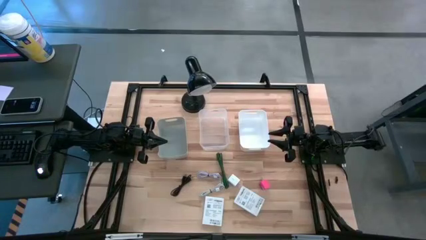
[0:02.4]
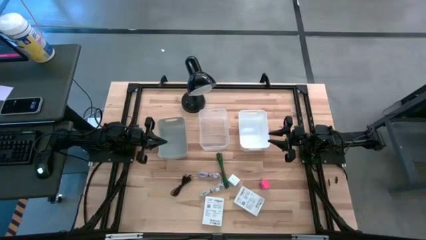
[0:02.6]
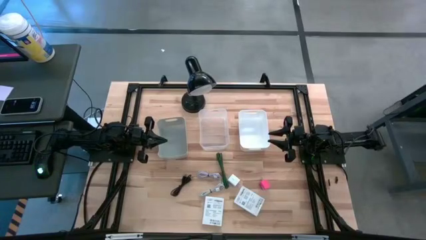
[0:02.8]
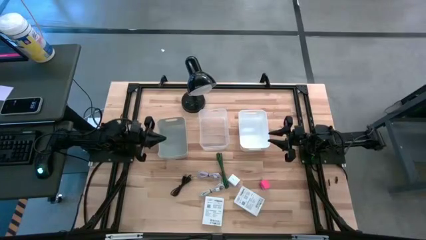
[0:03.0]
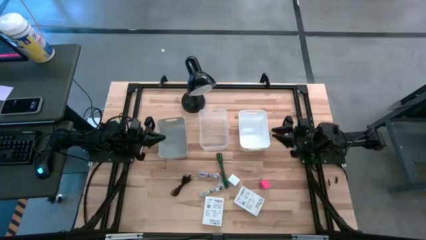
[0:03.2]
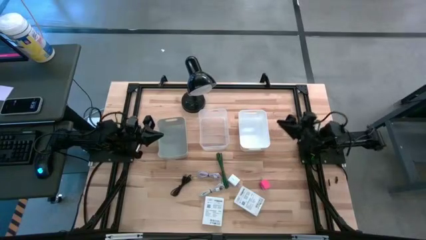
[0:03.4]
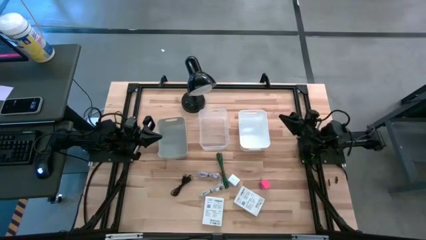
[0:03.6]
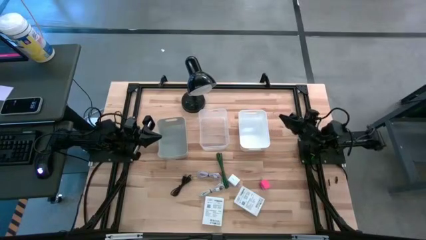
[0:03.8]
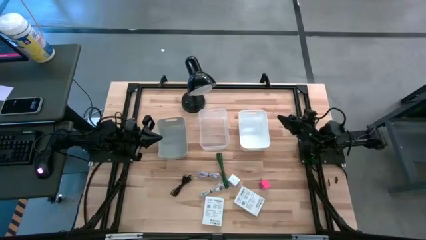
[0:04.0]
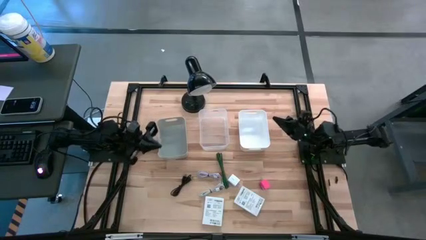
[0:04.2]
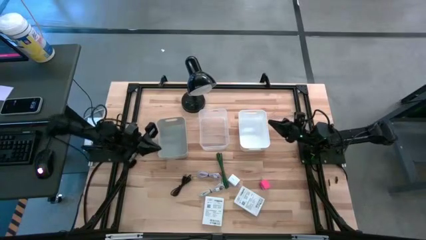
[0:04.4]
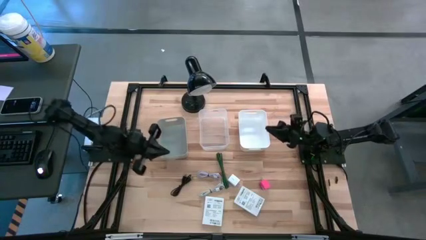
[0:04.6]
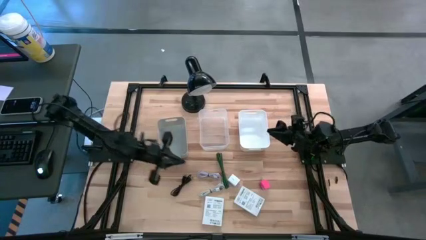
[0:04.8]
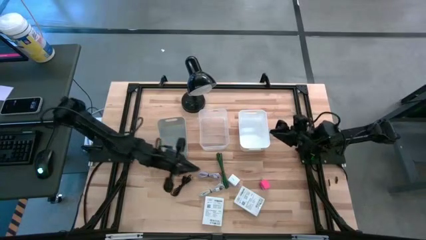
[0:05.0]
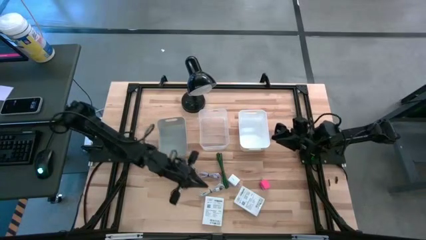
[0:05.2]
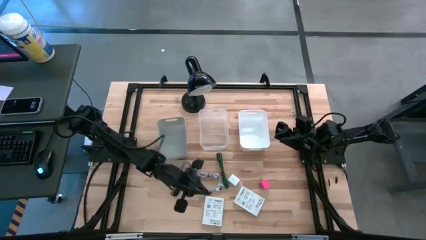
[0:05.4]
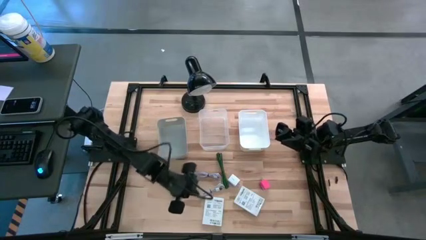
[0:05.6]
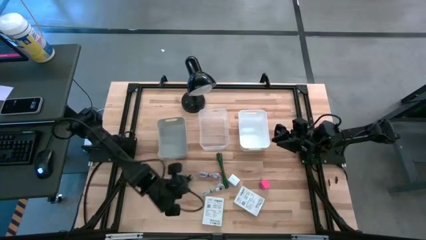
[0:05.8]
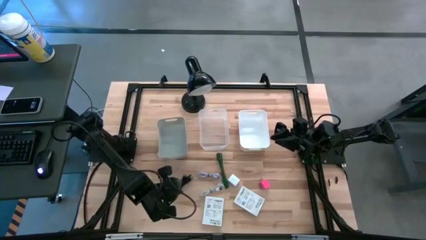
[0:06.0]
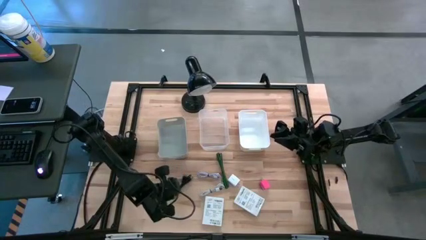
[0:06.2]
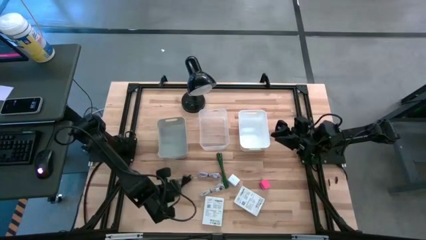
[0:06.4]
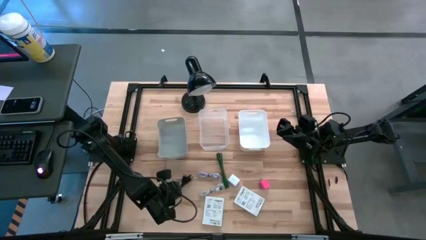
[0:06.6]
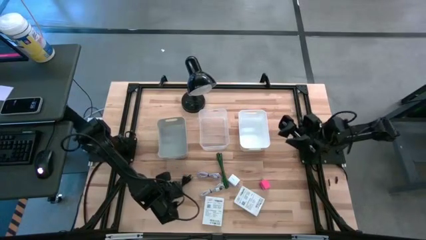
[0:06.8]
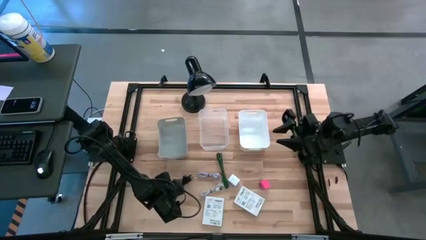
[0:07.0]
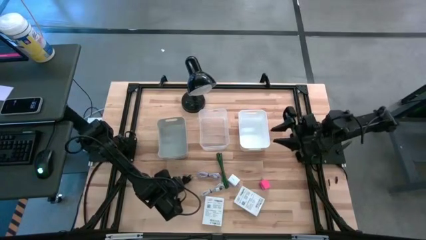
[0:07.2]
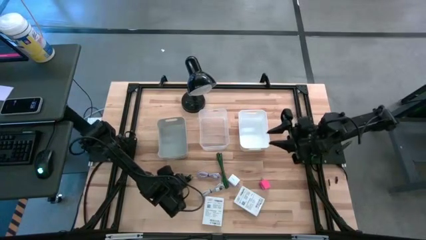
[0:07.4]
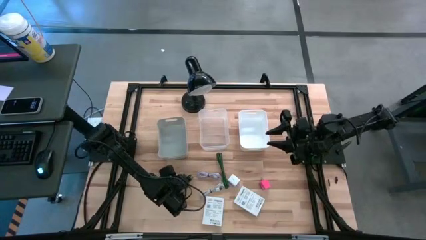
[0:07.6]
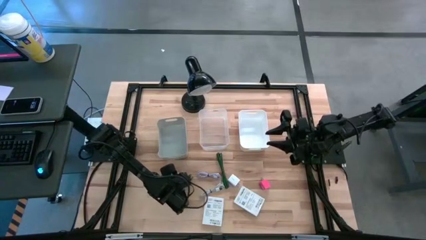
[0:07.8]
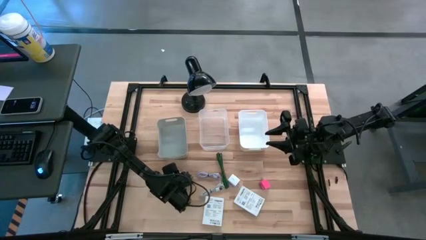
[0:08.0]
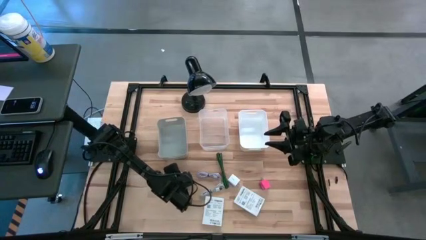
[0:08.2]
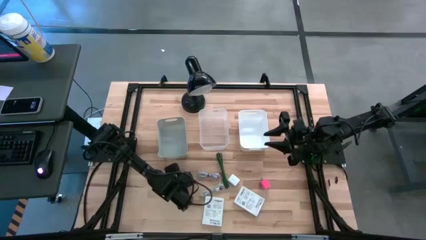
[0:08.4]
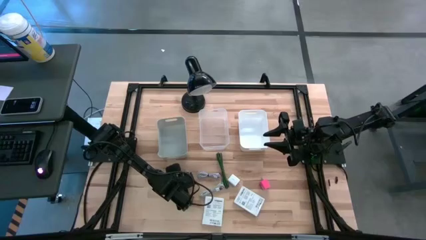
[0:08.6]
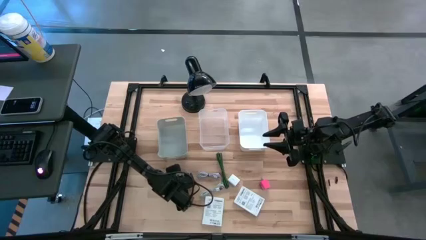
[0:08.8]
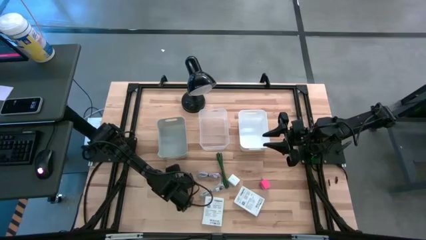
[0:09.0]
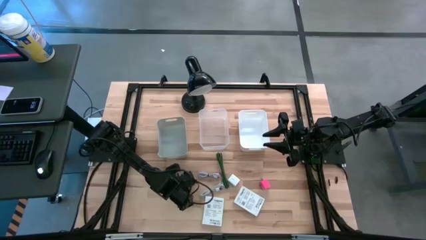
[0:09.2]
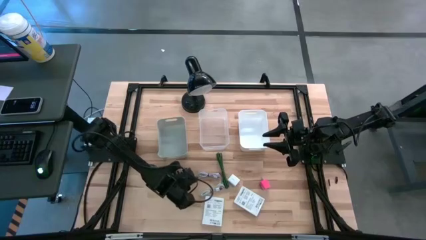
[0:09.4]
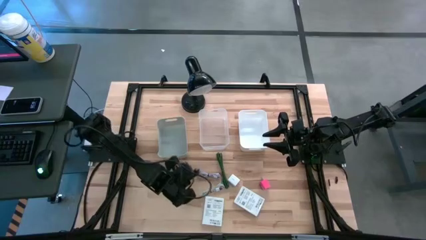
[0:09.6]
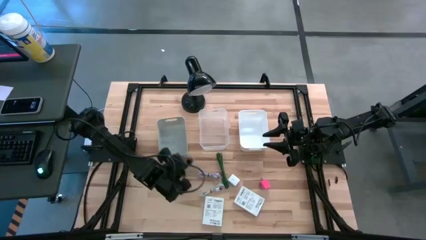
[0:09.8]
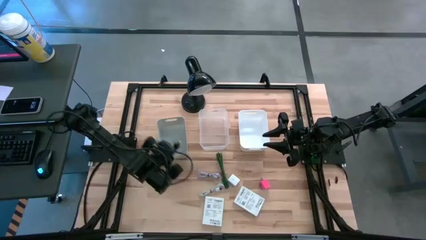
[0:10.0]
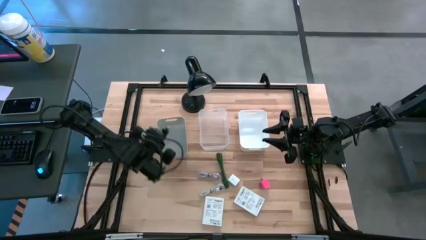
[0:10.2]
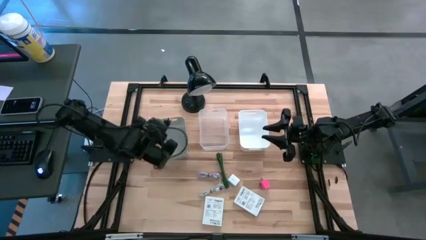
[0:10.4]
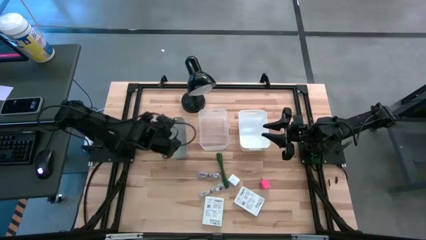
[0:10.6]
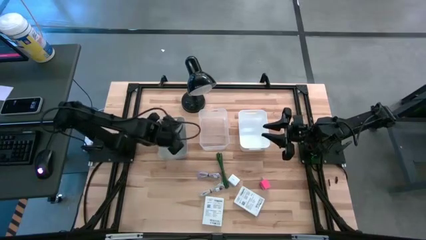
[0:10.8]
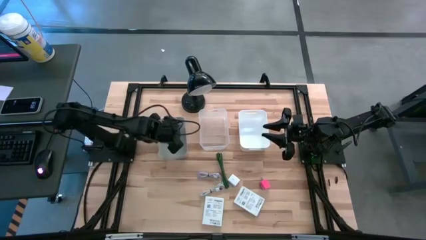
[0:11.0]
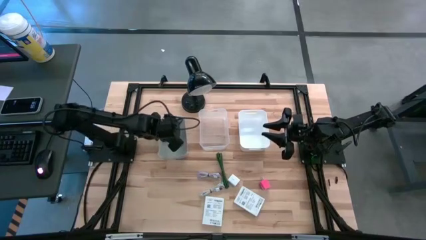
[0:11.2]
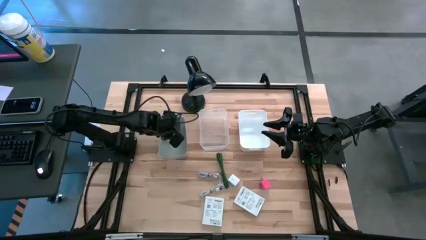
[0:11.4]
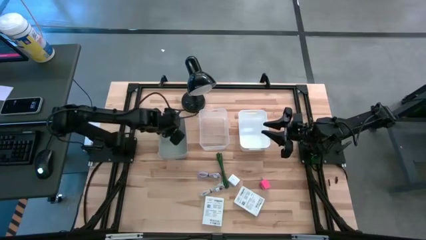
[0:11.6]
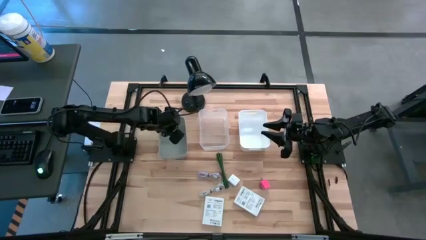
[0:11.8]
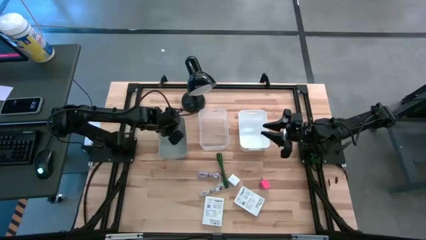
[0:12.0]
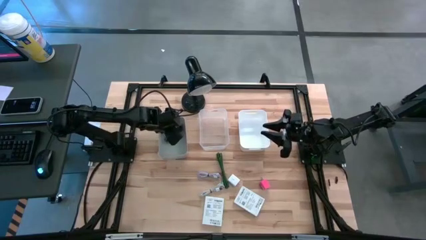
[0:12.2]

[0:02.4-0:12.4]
Task: Pick and place items into bin
Put the black charger cable into the gray bin

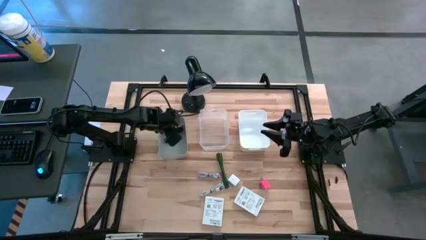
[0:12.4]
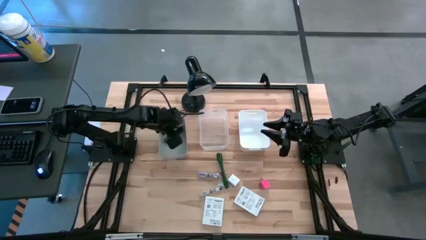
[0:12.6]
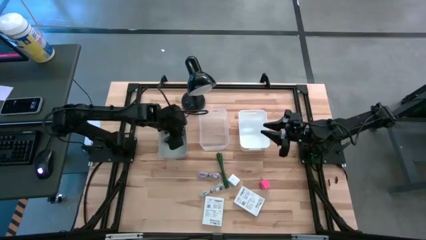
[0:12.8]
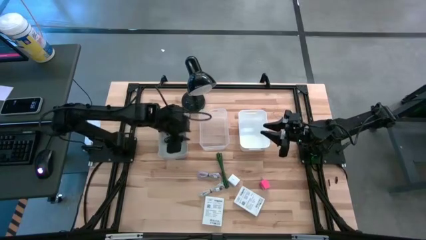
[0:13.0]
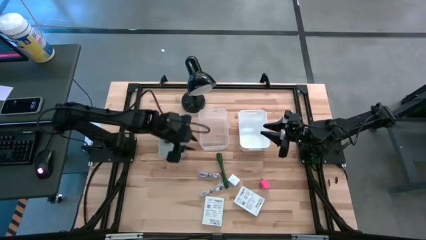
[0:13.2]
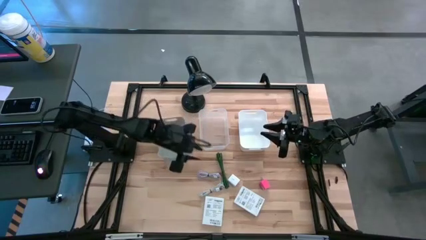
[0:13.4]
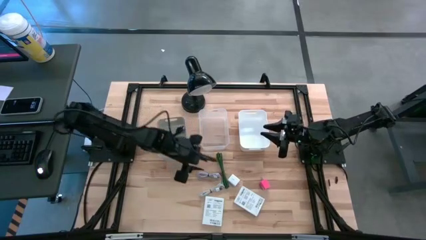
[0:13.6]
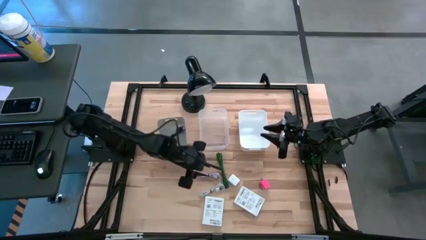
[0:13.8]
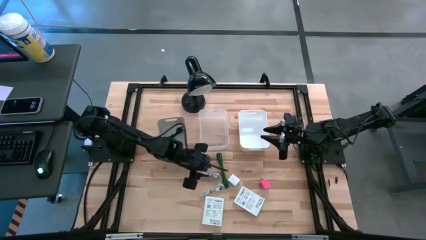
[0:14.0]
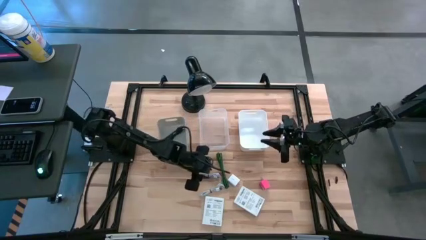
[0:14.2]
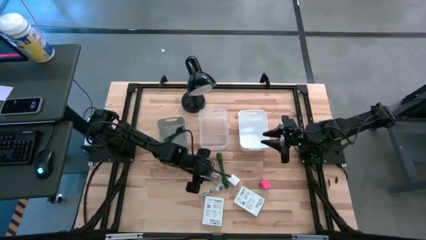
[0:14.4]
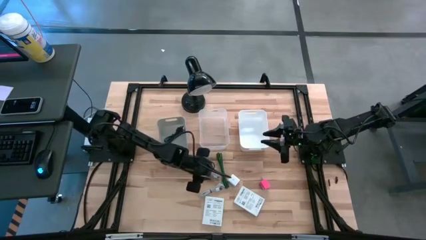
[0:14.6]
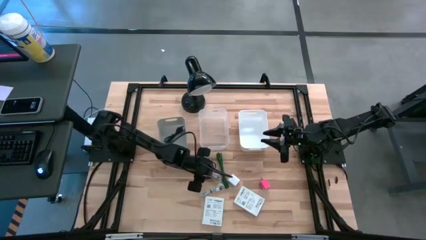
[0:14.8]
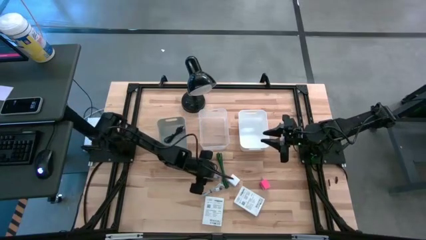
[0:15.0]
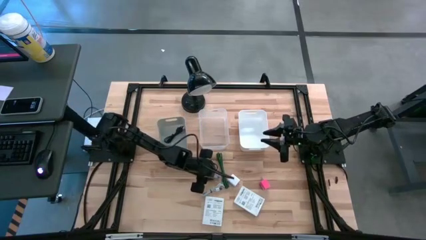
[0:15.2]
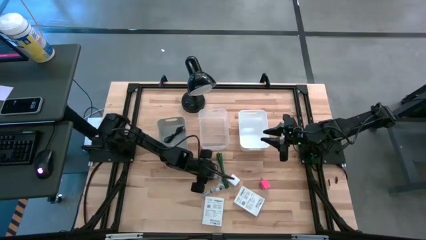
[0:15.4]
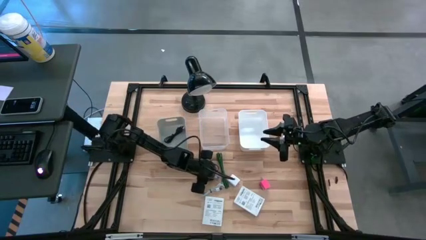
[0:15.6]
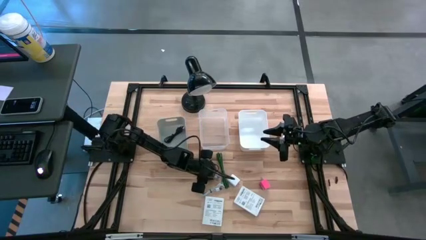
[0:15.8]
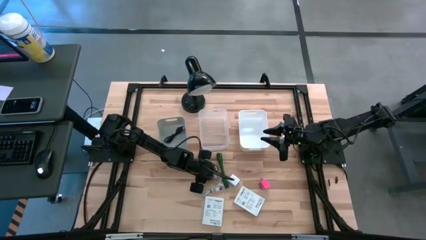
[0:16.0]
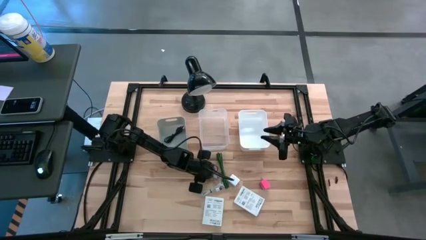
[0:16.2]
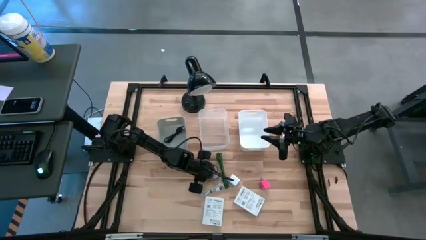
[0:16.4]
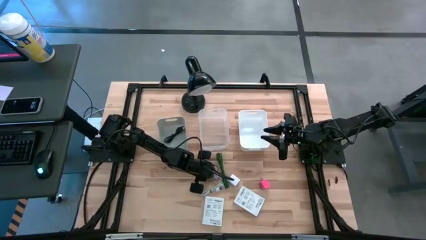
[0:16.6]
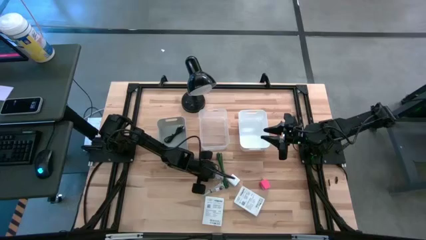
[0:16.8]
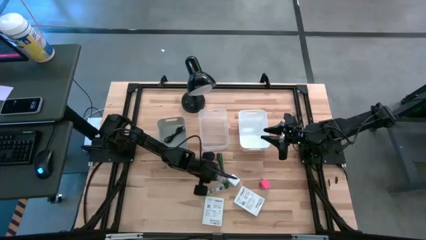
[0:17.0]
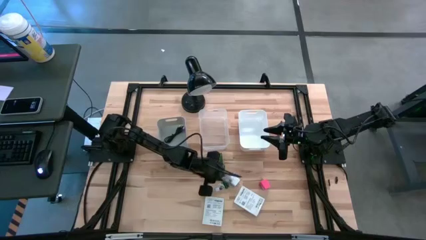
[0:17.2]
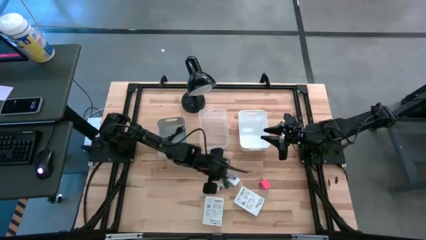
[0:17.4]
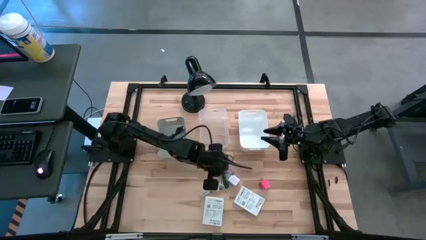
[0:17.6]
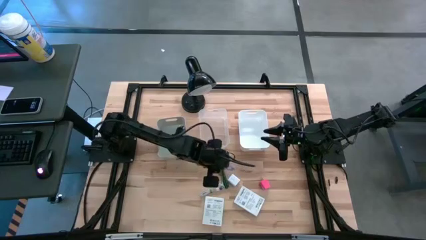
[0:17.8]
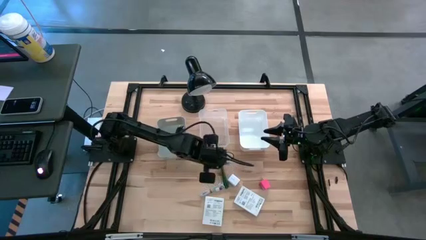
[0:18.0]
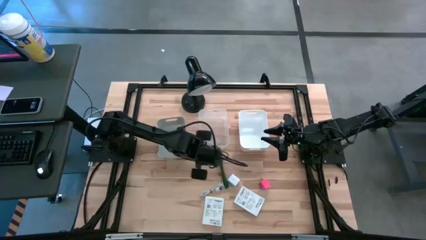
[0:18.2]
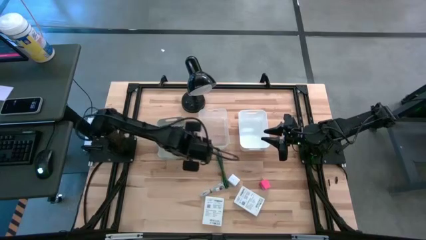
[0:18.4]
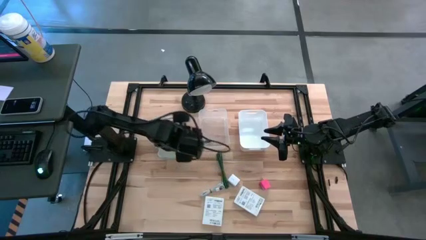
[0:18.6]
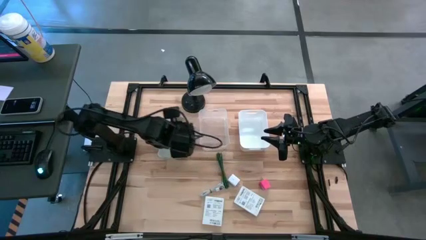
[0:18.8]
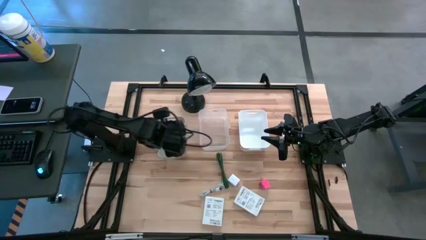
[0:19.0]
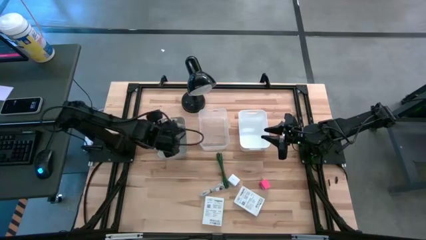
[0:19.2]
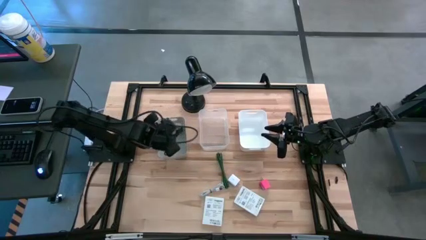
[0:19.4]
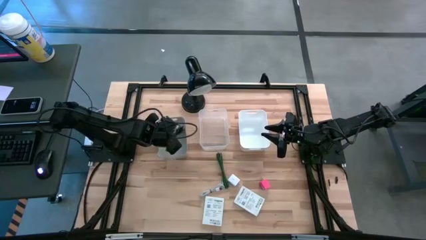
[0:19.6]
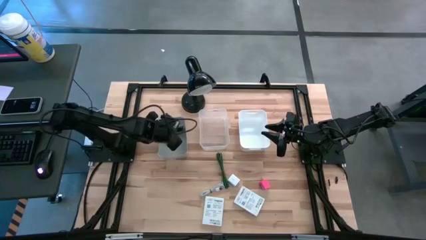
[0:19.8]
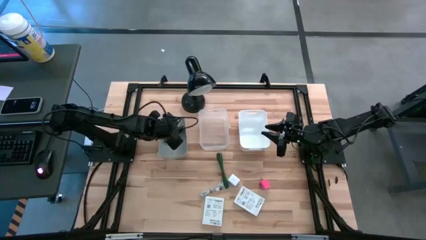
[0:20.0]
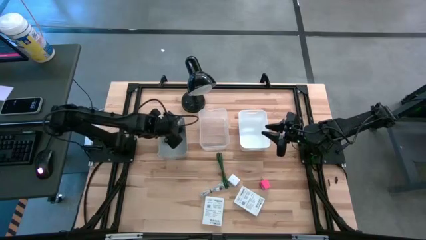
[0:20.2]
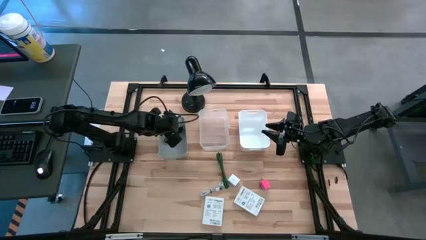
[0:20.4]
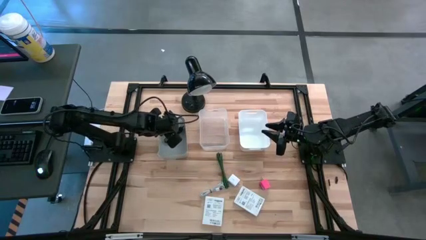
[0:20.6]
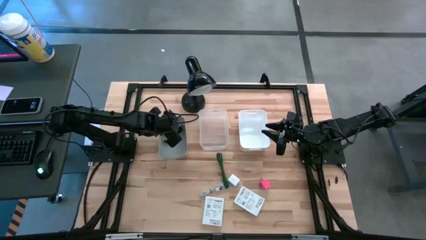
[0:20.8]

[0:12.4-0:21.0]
Put the gray charger cable into the gray bin
